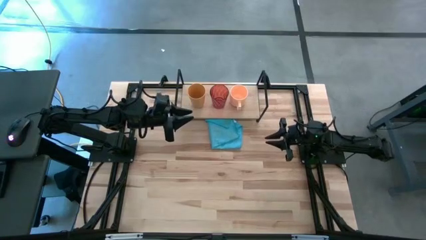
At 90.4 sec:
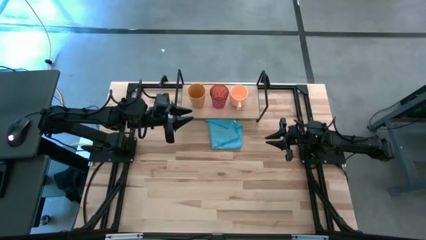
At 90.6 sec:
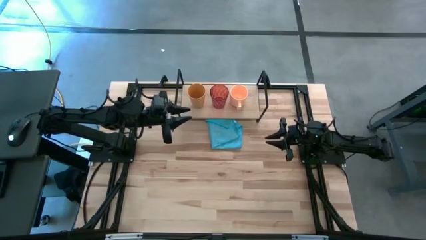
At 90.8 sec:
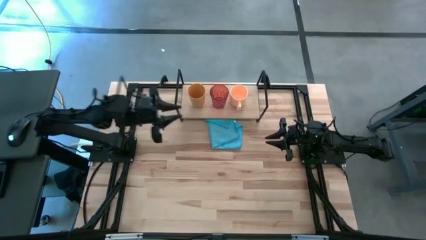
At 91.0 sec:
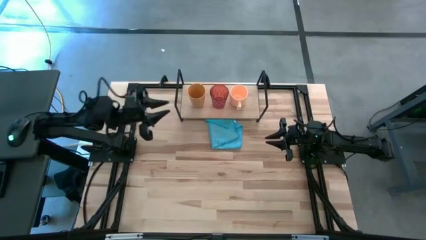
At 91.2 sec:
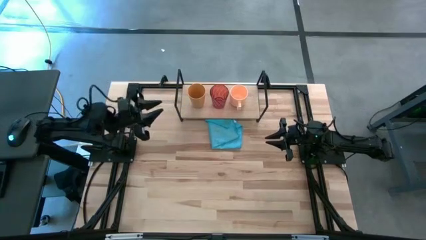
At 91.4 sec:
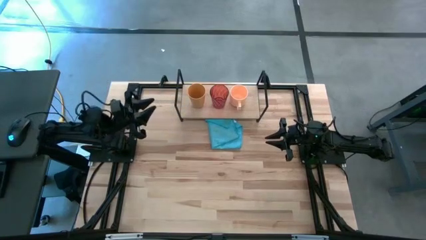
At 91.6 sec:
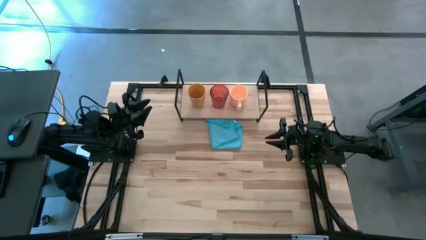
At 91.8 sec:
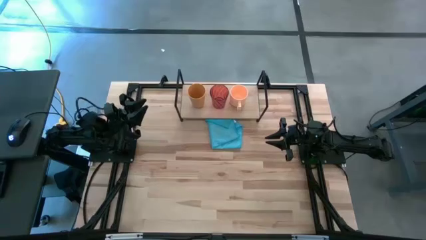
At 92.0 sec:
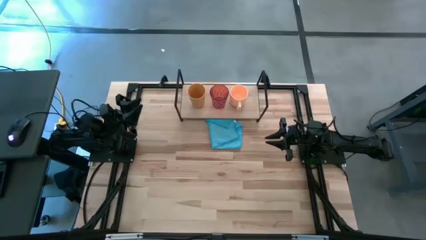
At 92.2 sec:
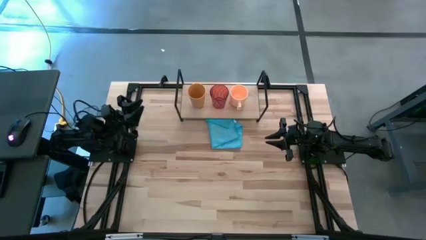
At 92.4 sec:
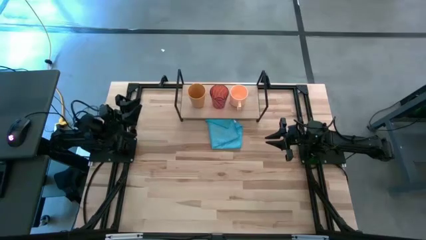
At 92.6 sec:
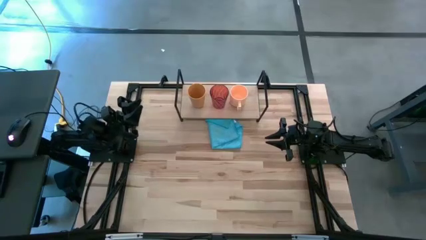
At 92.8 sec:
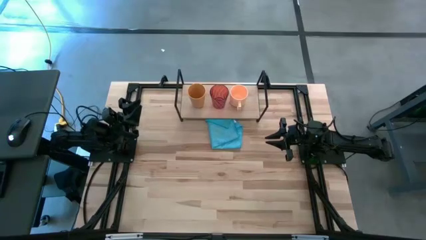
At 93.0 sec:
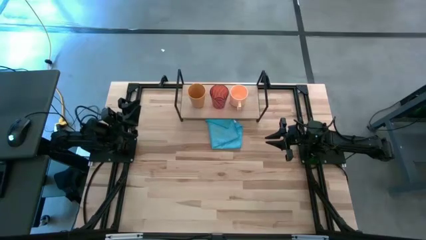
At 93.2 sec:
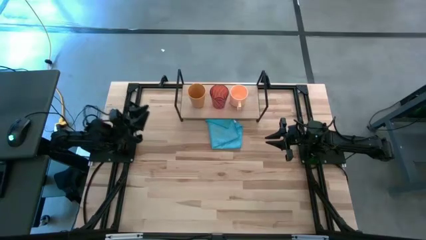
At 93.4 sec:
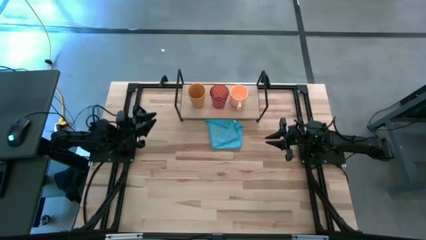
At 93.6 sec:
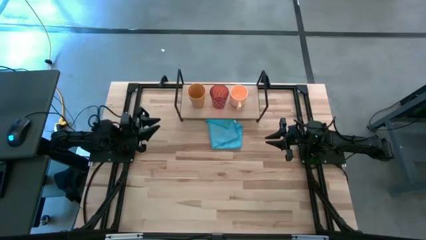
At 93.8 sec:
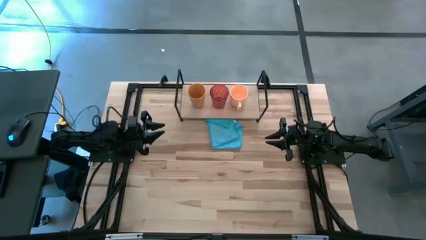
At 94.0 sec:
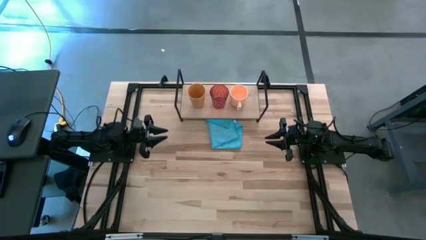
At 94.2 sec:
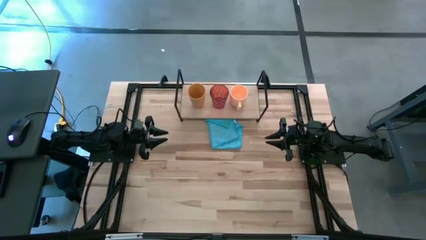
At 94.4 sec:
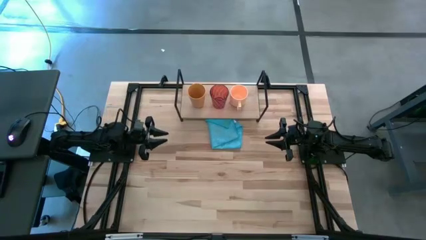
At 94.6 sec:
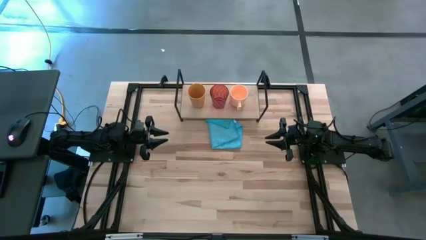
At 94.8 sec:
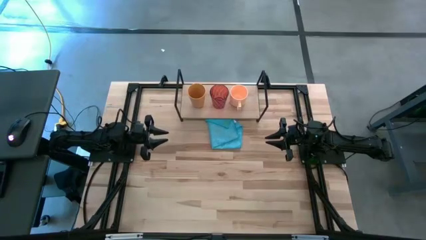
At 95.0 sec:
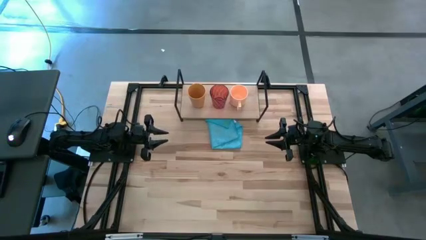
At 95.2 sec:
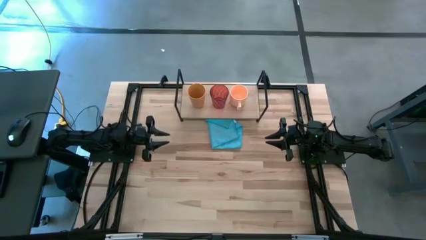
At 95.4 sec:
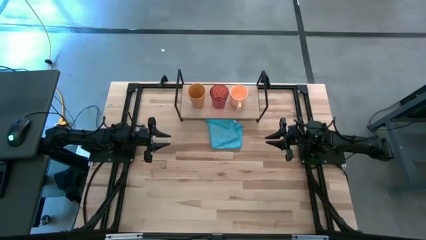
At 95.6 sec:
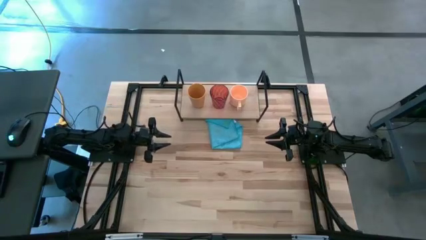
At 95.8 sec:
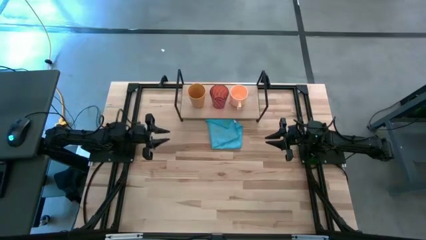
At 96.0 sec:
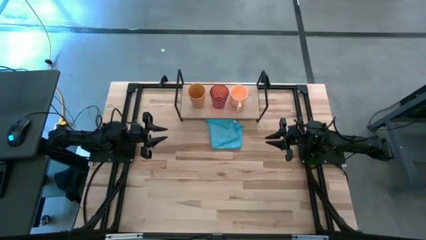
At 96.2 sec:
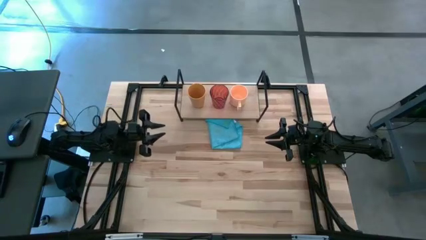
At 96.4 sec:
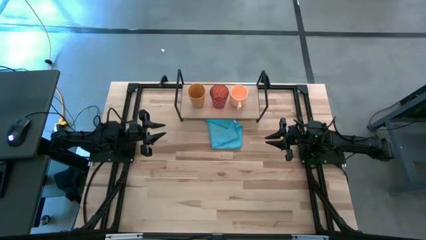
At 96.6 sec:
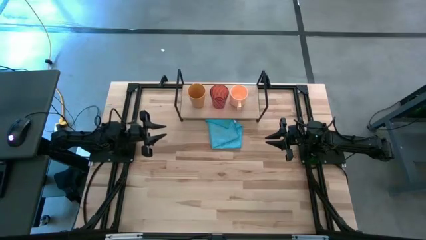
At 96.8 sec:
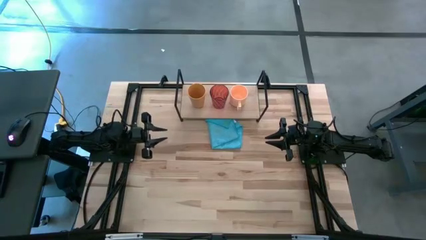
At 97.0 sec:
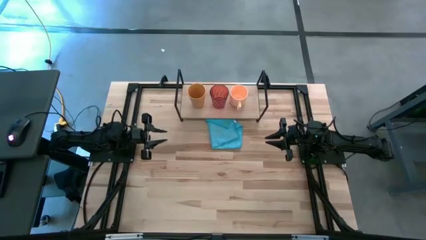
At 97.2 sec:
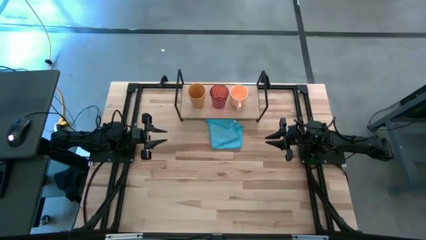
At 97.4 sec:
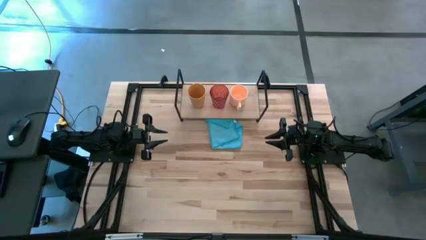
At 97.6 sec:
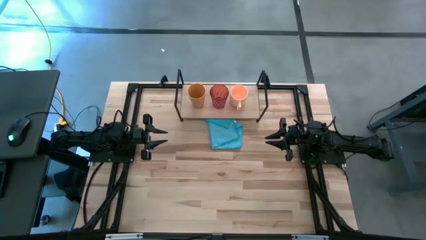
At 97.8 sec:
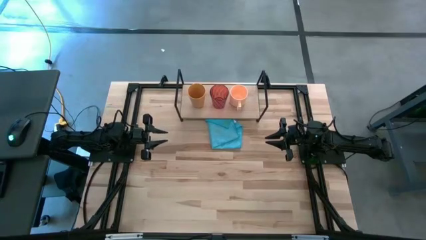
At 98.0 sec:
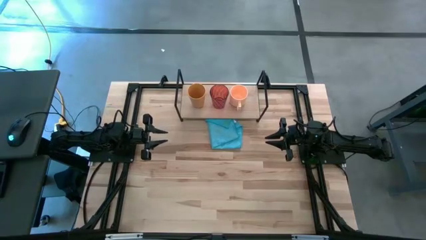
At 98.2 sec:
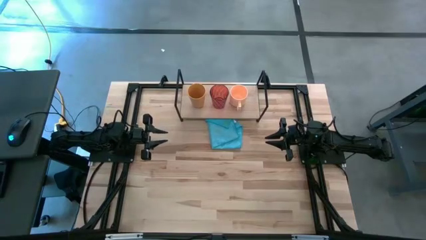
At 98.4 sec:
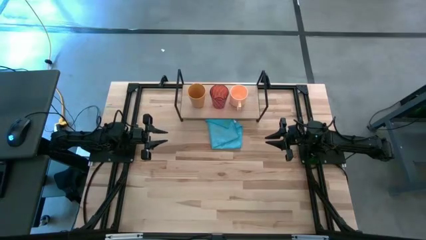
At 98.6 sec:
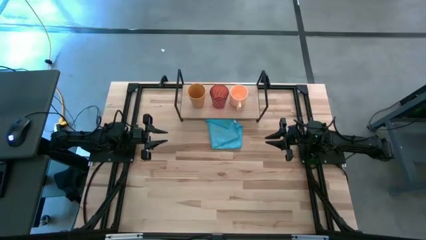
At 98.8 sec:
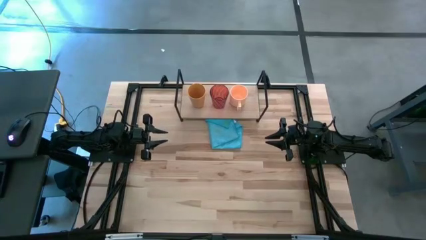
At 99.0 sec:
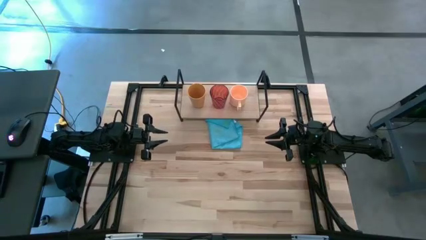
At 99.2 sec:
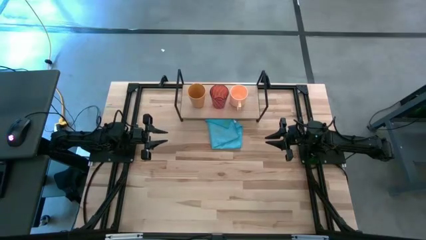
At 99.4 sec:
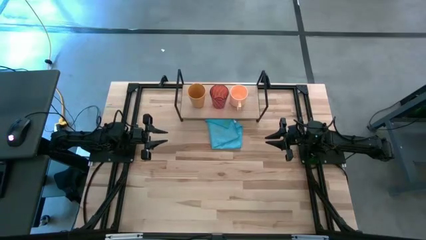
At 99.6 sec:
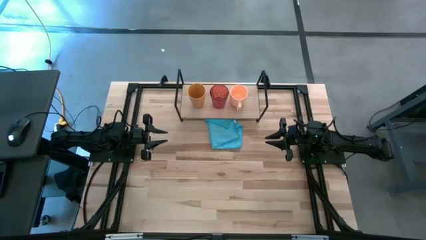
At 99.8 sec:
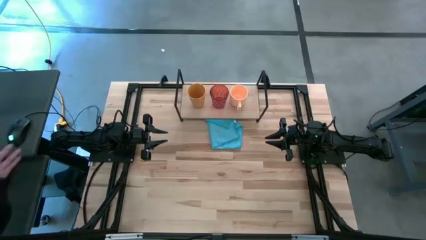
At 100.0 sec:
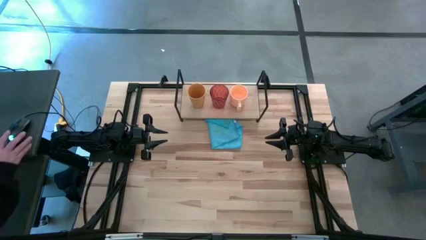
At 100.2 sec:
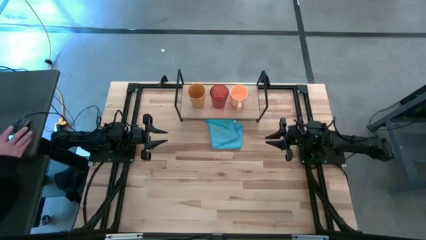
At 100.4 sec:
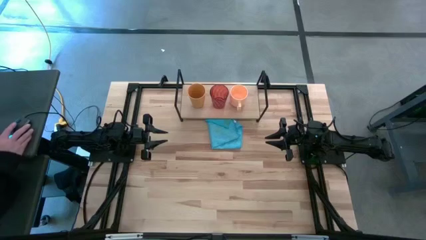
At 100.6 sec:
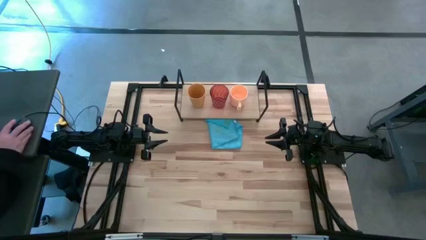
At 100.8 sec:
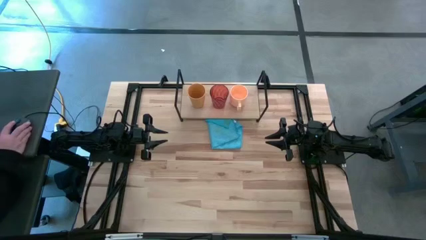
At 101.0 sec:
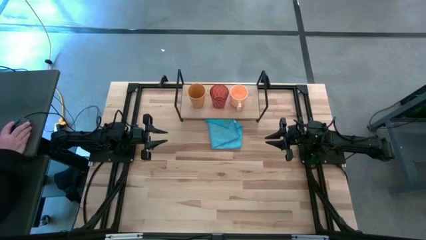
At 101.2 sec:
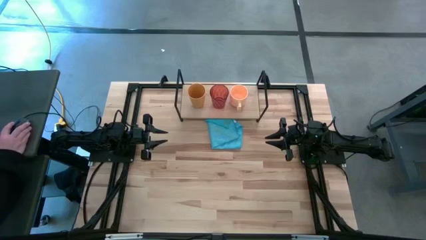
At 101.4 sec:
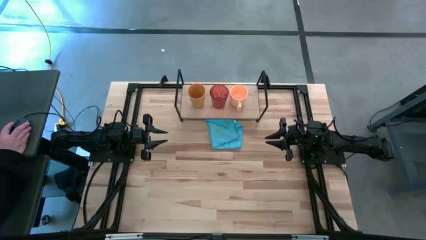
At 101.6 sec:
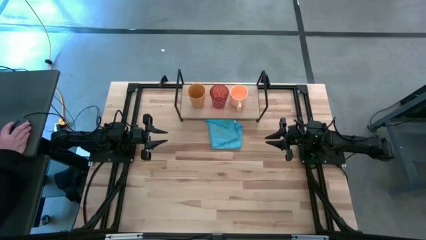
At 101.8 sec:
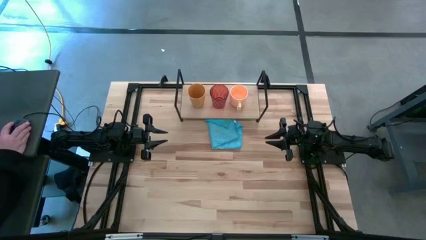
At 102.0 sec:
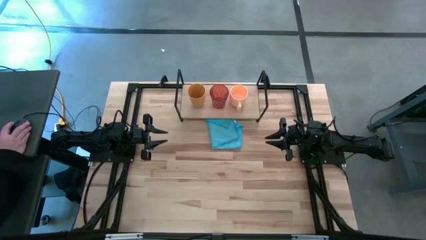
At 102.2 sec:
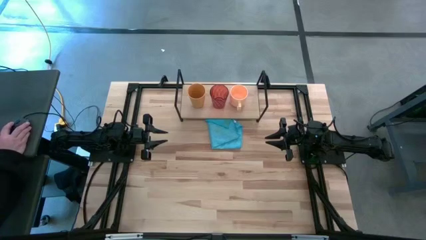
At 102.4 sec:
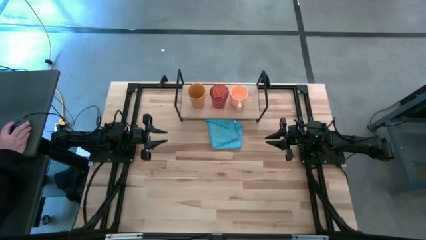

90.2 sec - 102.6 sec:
Task: Stack small to large cups/mugs on shelf
Return to Home Position

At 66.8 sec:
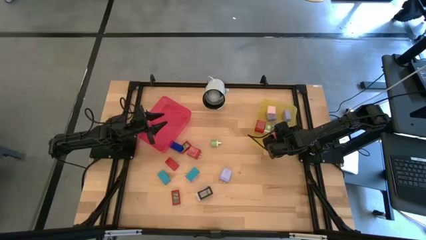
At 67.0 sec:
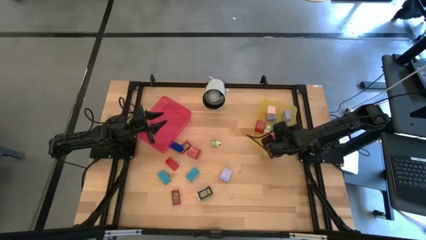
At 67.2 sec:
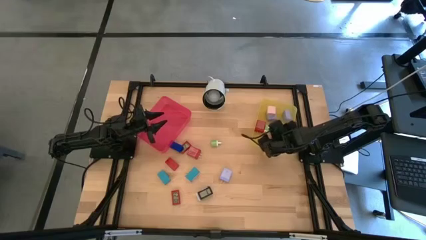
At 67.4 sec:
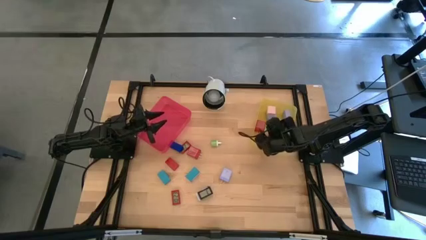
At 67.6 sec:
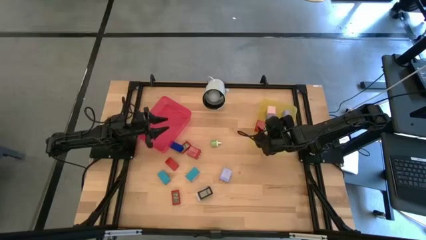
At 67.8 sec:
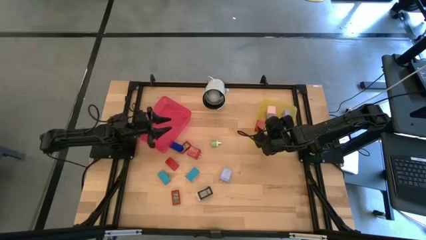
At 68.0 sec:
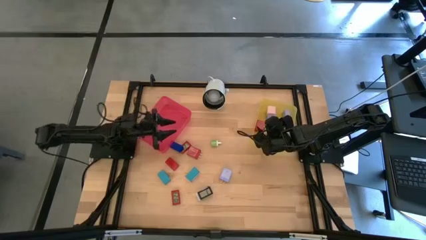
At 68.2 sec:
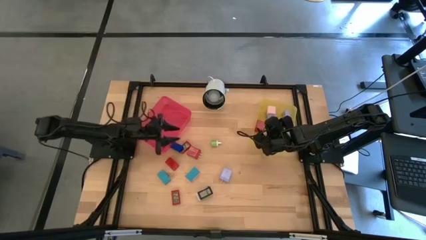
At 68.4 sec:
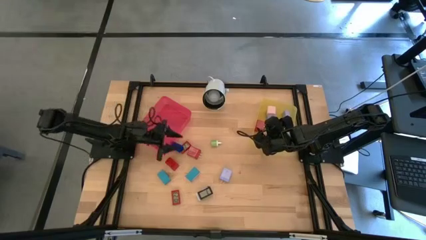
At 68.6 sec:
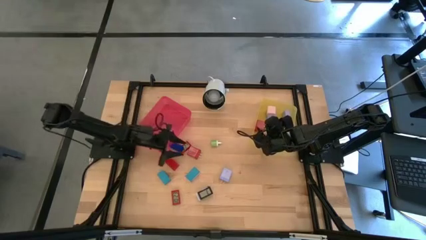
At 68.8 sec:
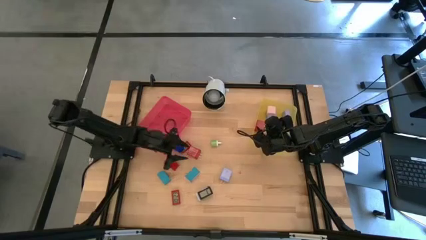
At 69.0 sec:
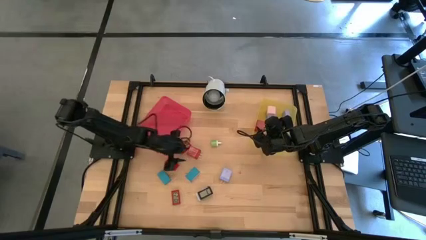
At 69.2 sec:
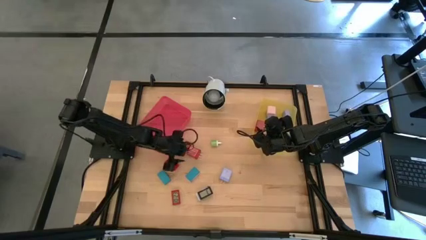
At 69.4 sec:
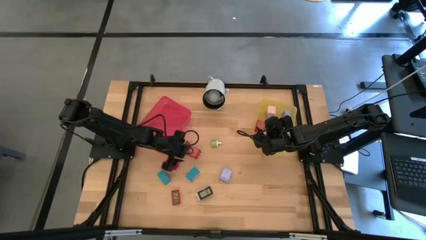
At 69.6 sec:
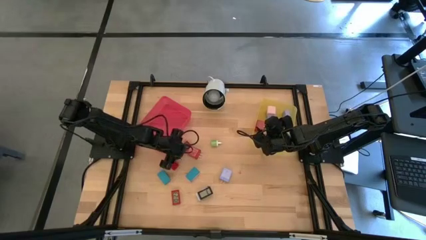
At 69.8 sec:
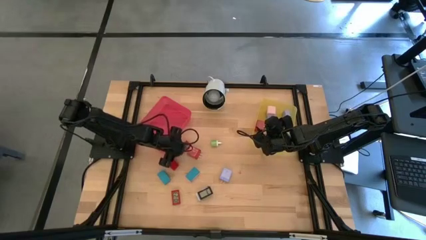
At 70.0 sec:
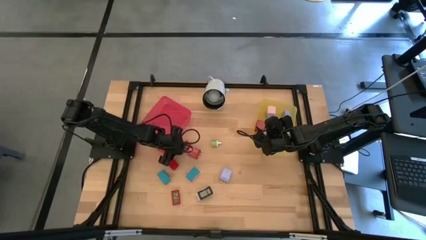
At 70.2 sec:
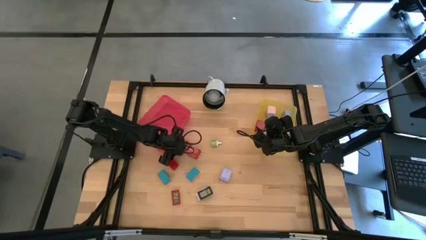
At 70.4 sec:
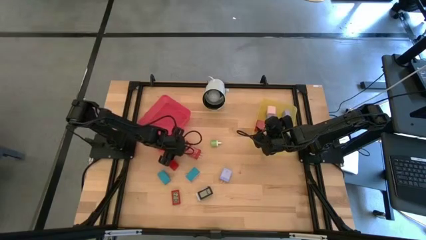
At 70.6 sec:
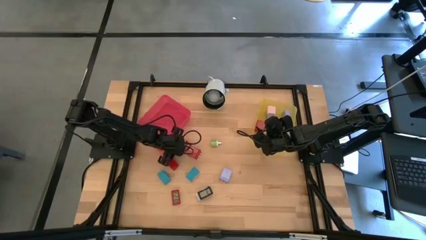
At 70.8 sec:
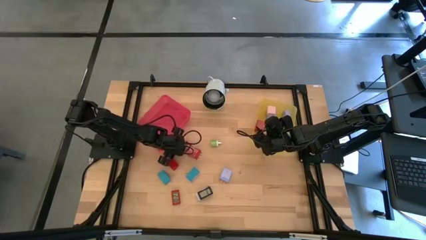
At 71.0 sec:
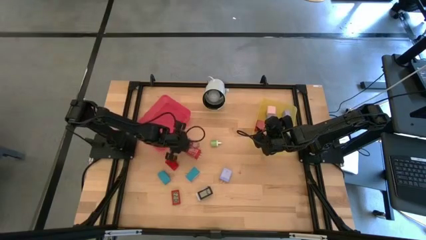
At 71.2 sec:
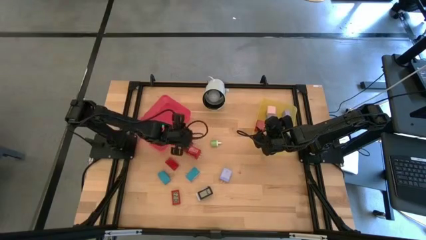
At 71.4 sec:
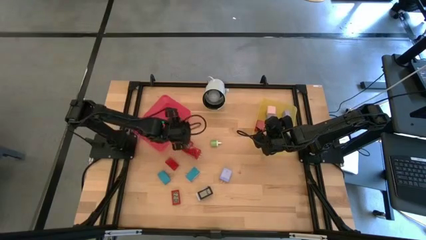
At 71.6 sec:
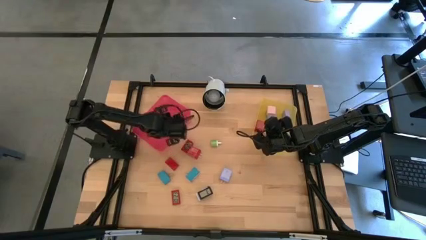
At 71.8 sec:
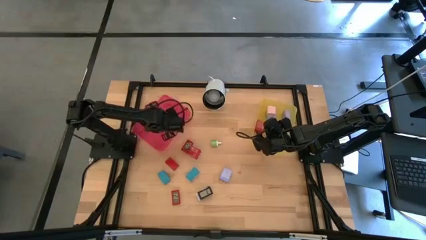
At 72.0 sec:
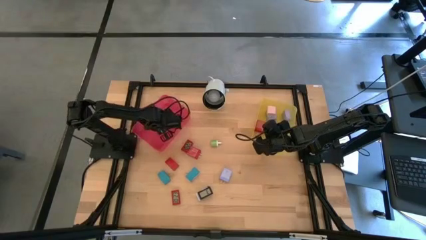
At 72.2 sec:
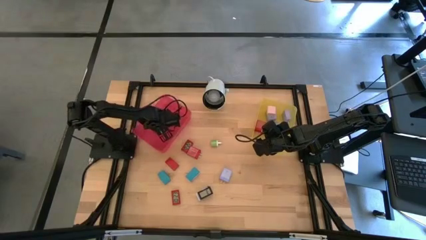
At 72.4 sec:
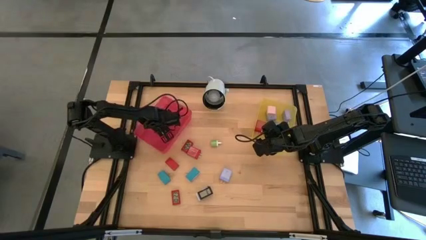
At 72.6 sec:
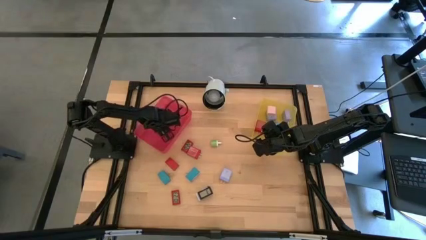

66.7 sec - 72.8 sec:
Task: Pick & Place Office items
Put the dark blue digital timer into the pink bin
